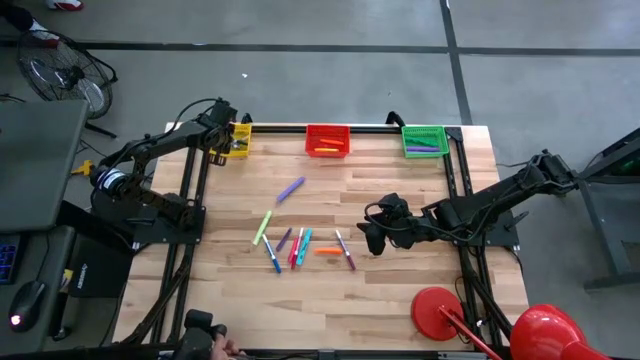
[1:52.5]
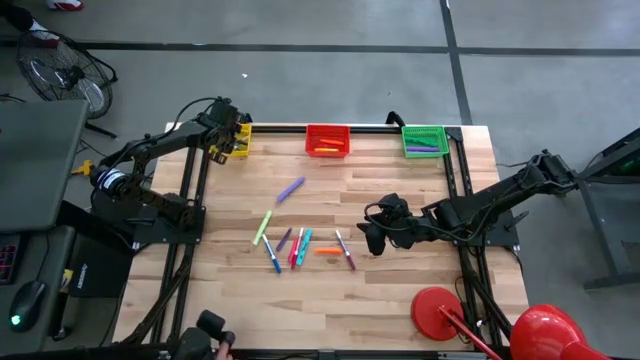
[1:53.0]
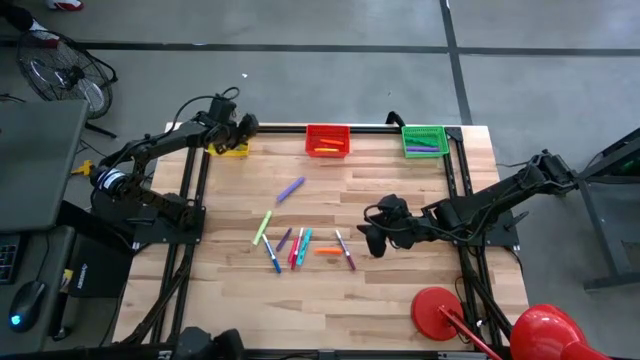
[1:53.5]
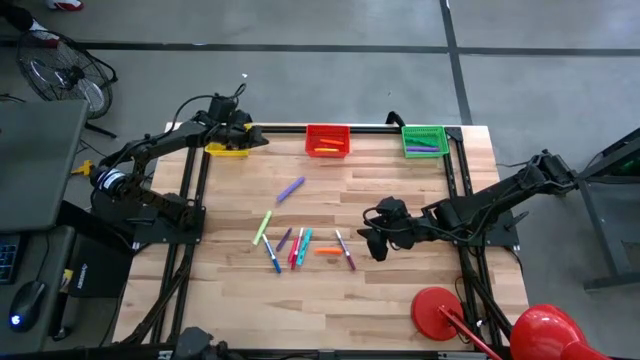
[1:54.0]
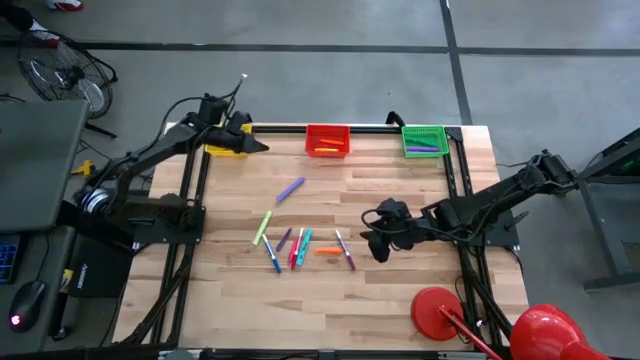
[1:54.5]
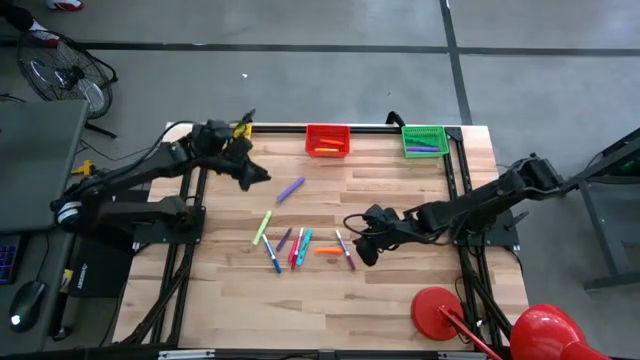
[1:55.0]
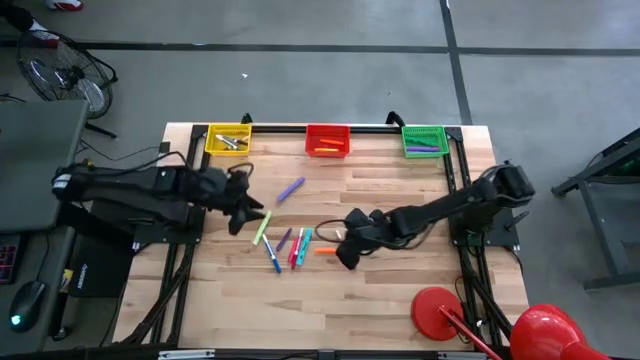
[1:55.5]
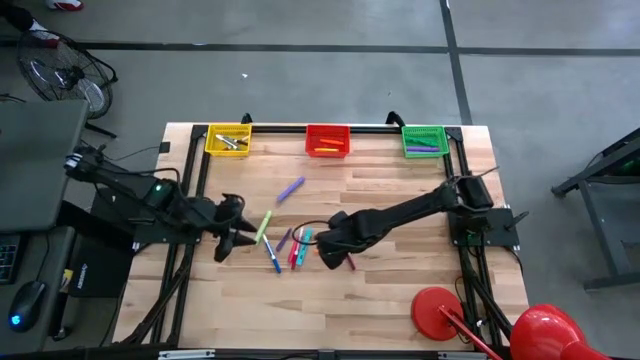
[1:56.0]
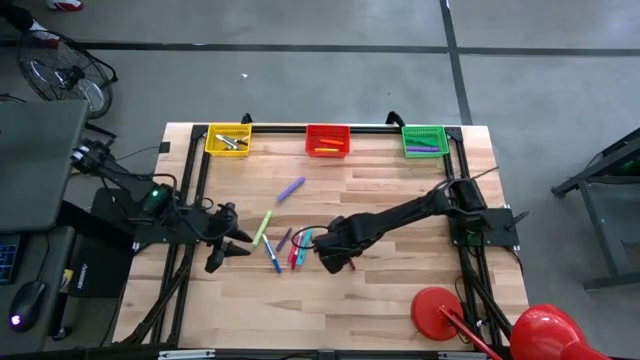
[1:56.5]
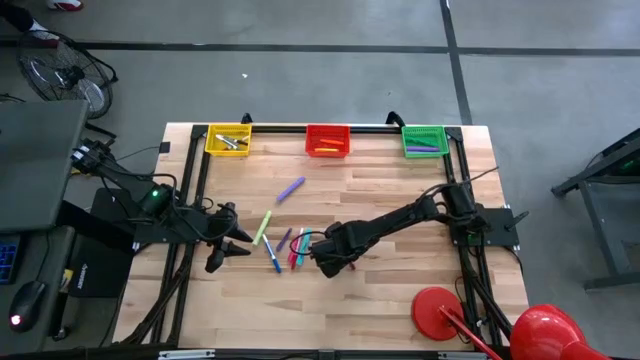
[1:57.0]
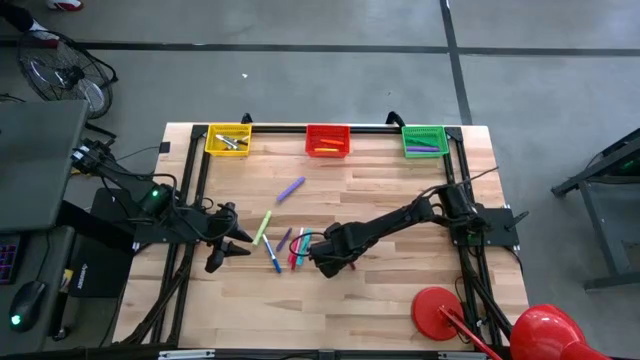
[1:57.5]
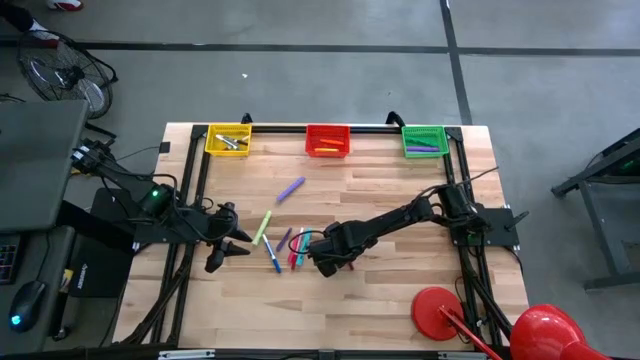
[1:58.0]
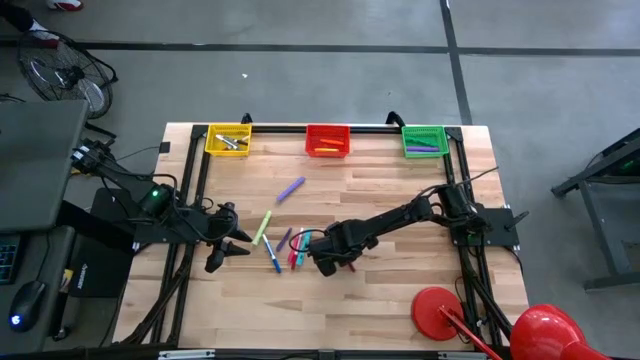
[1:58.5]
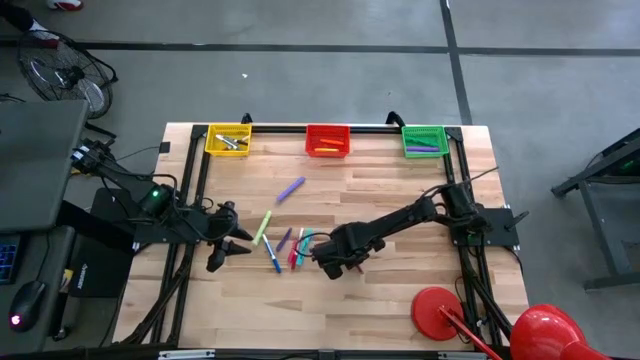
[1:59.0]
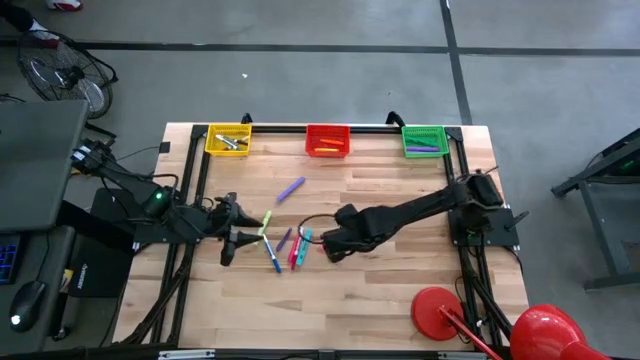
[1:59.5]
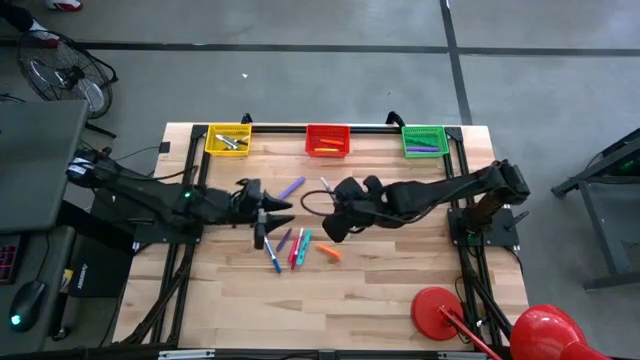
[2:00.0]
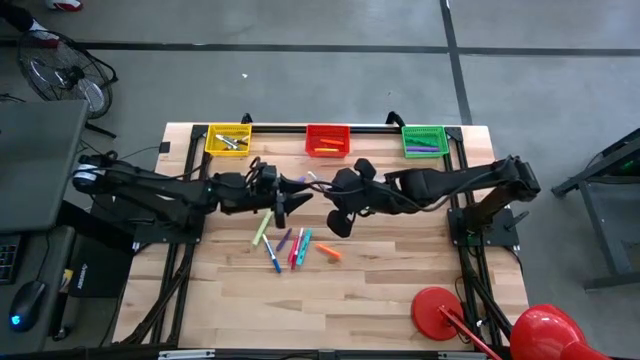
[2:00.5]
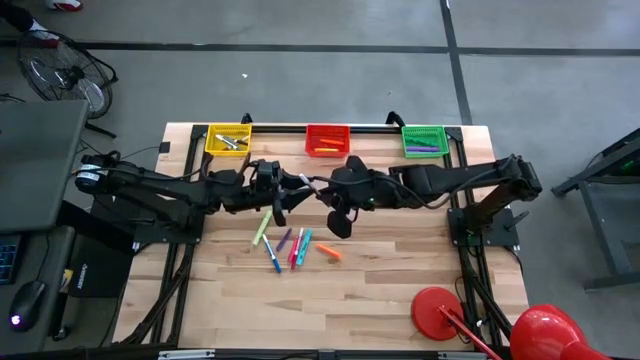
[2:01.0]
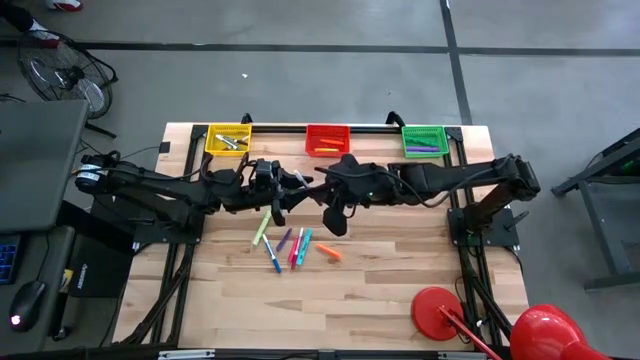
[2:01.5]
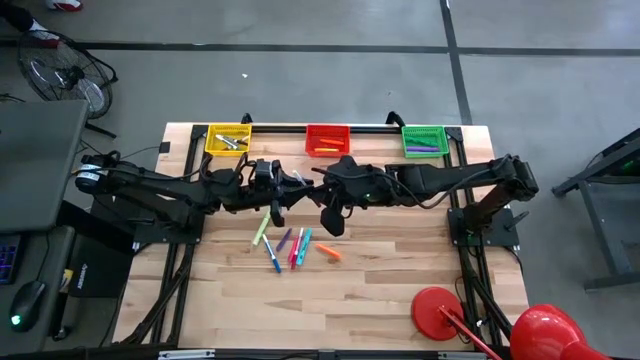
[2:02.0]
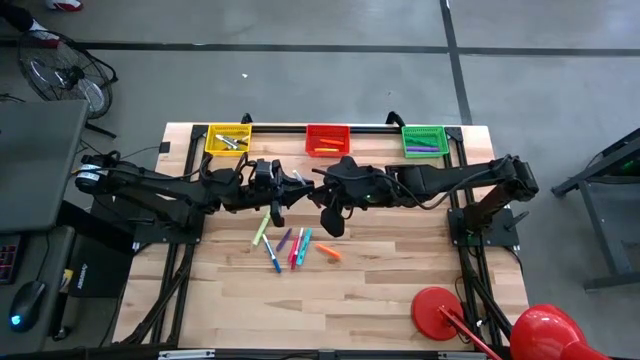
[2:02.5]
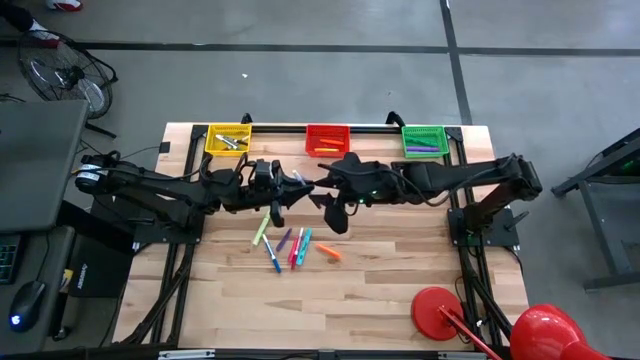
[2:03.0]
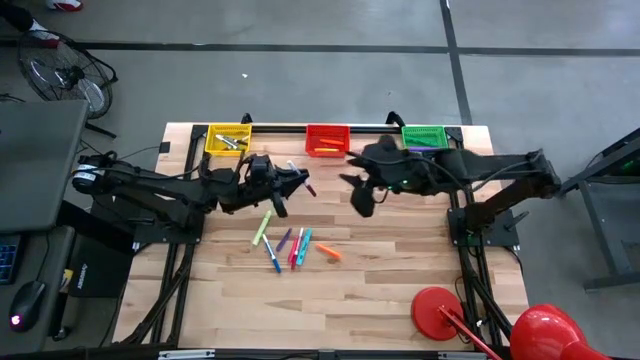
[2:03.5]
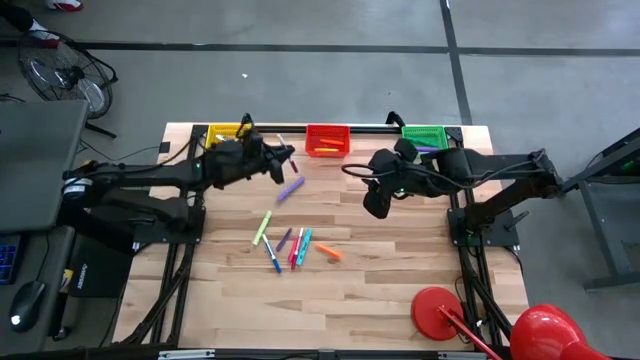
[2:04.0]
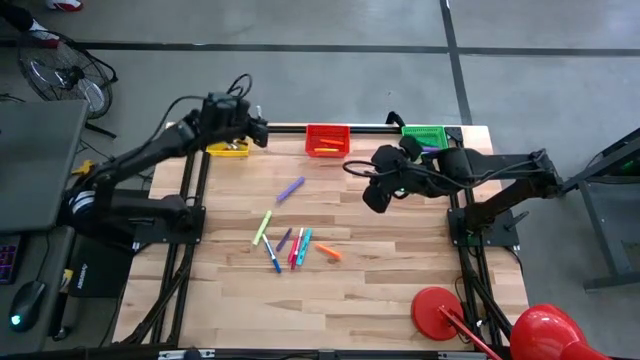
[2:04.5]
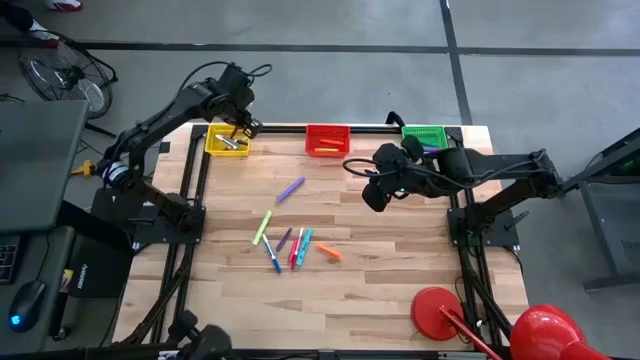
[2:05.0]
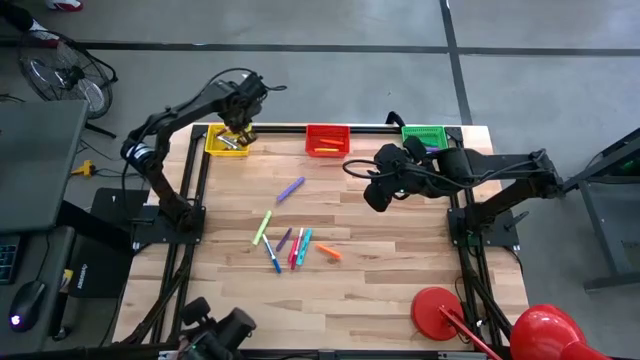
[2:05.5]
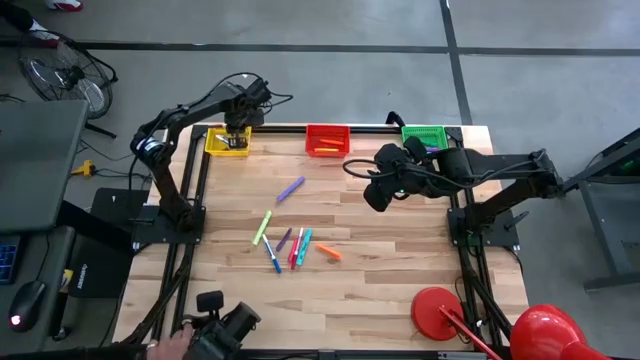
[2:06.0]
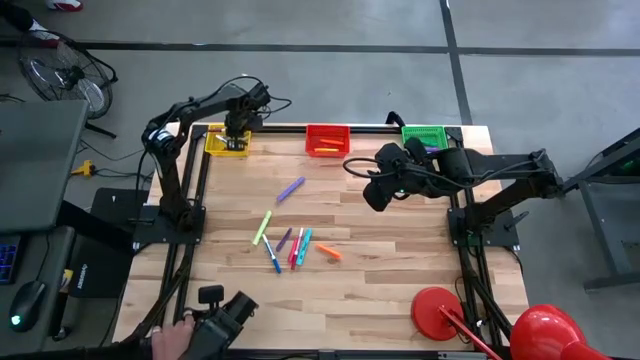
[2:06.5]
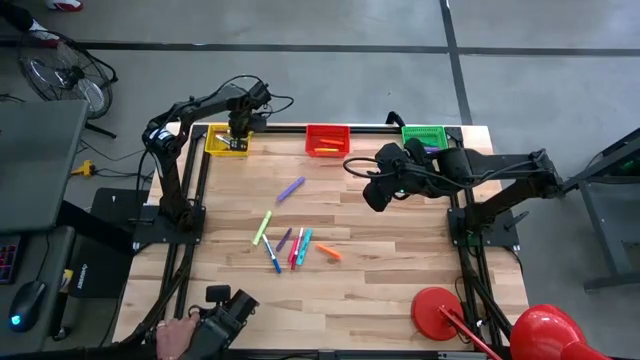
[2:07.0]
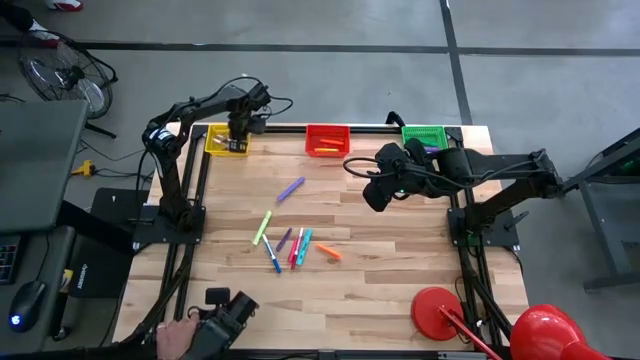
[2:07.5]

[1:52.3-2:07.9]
Task: Pick & Place Markers
Put the purple marker into the yellow bin

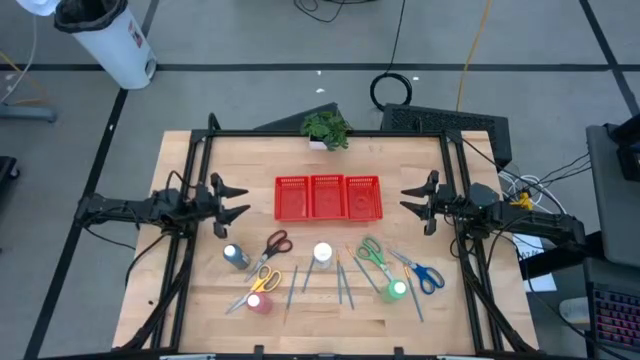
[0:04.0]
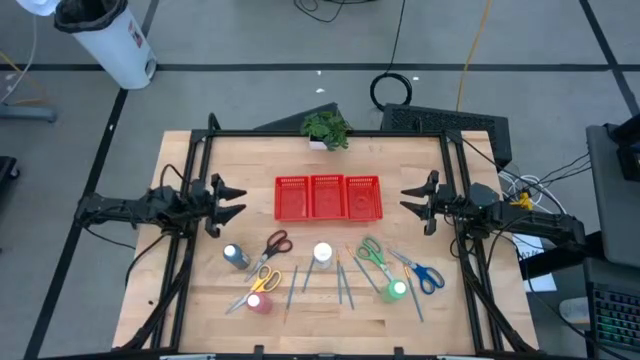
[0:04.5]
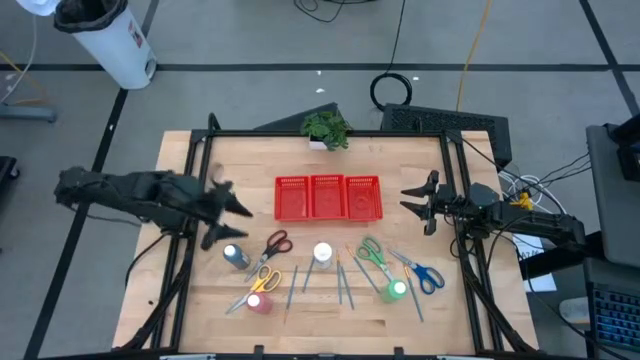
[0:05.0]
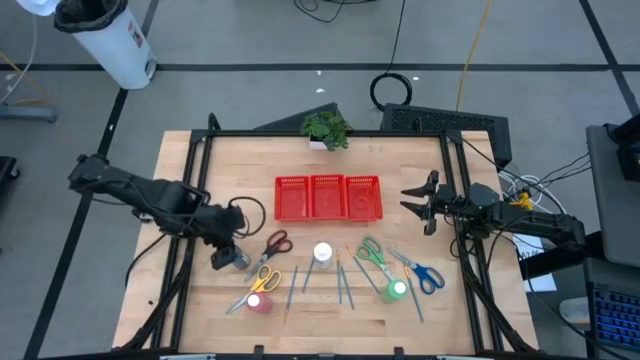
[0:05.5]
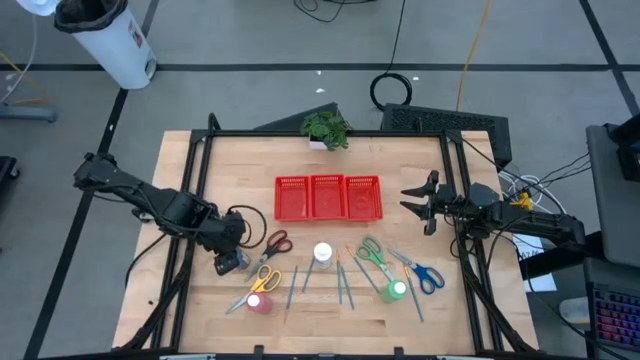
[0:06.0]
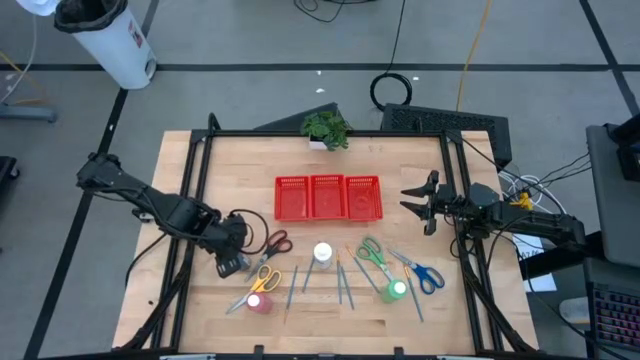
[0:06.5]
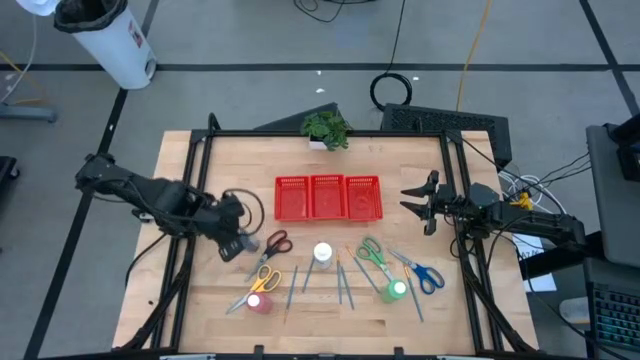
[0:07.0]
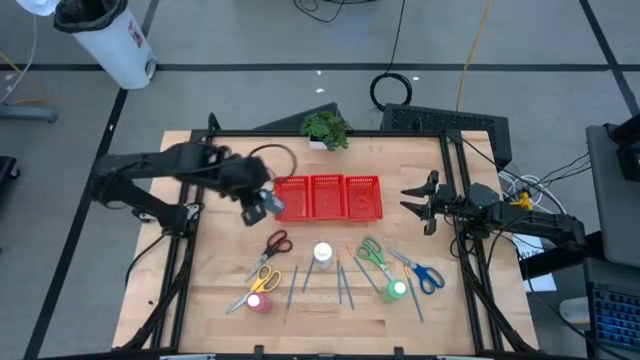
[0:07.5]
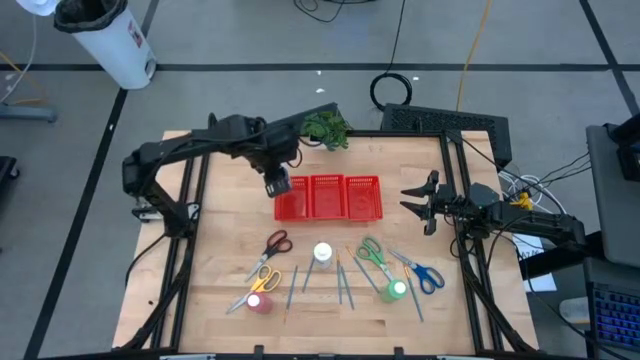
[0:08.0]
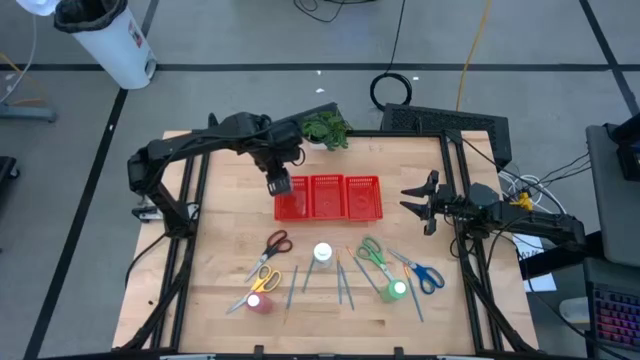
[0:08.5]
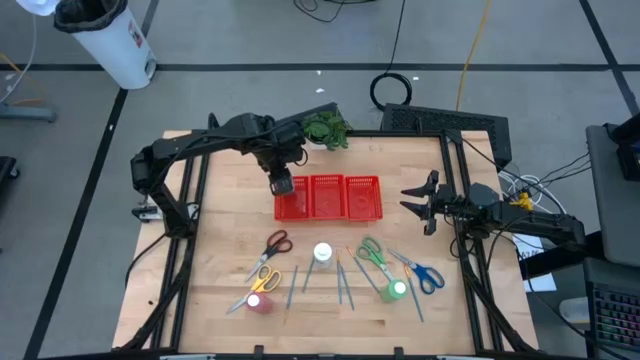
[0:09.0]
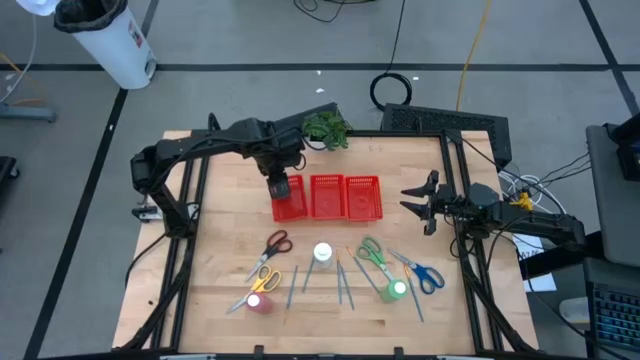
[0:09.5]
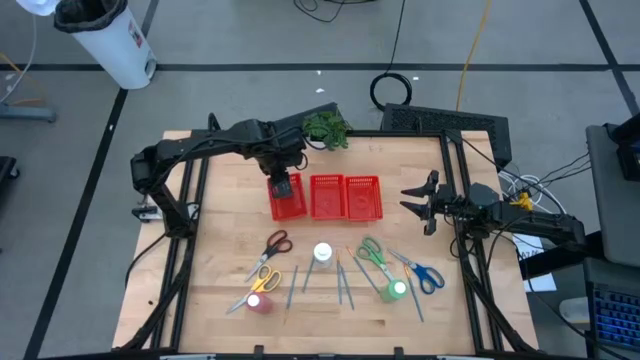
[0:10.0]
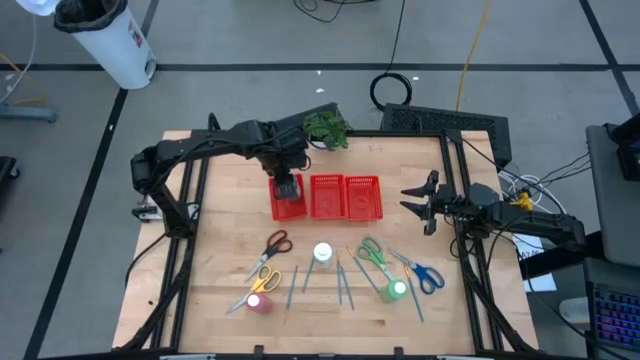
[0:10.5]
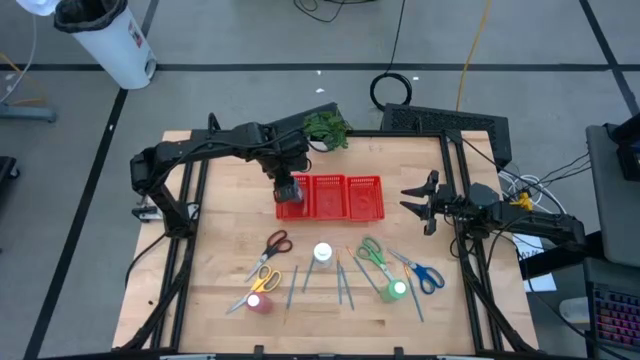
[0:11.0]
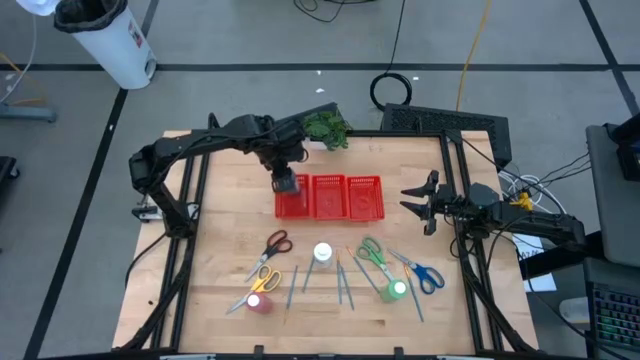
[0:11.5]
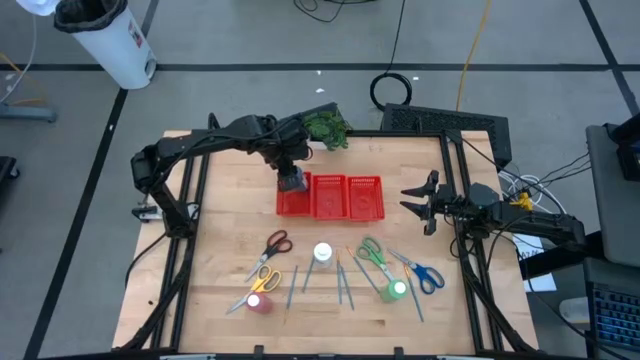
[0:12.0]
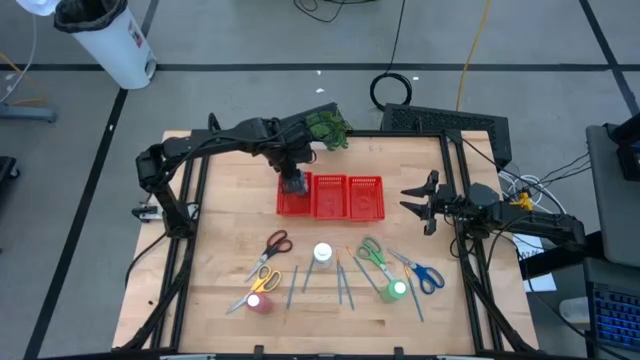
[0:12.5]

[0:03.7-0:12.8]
Task: Pick & Place Paint Supplies
Put the blue paint bottle into the left red bin
